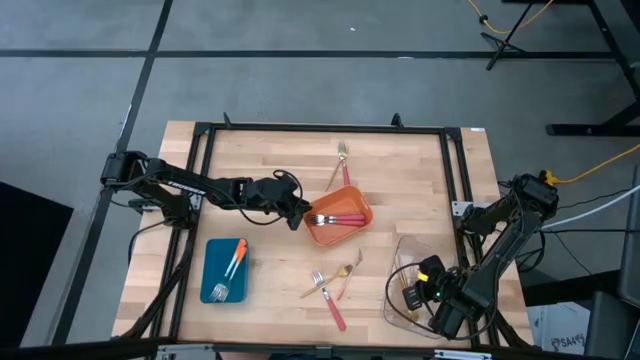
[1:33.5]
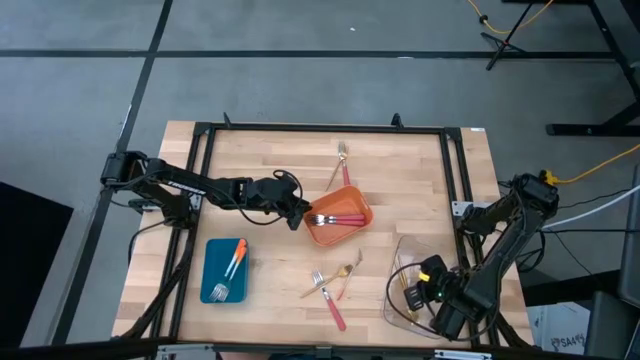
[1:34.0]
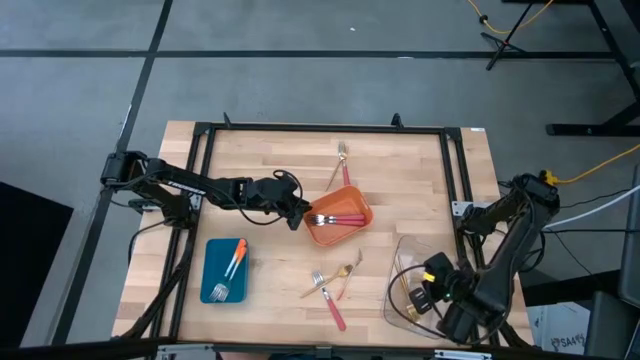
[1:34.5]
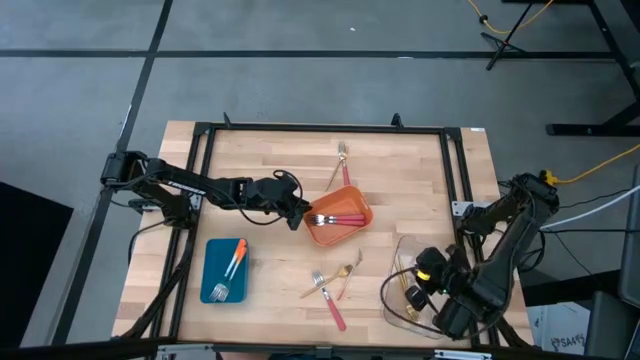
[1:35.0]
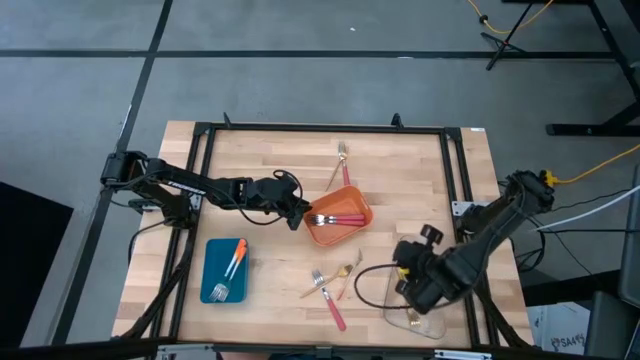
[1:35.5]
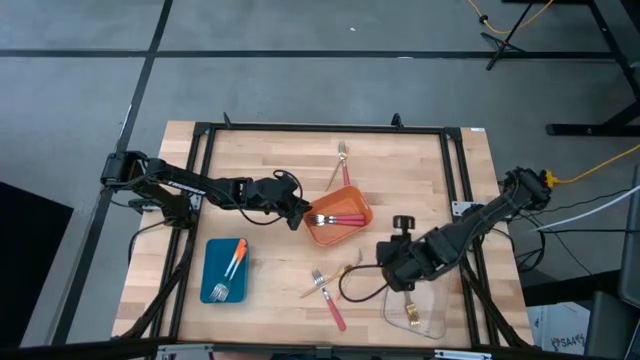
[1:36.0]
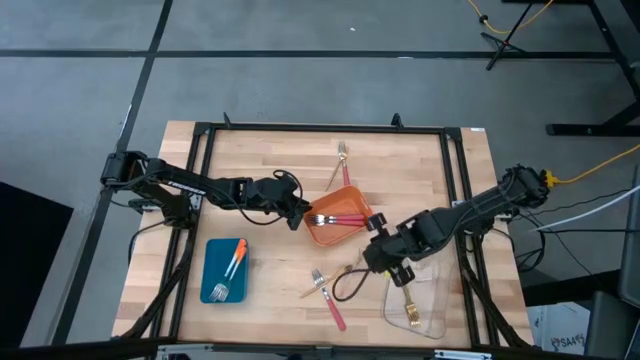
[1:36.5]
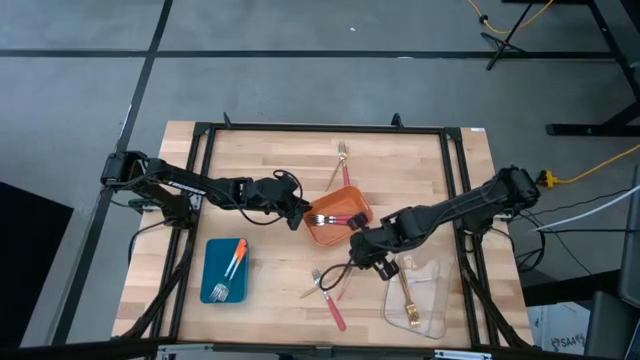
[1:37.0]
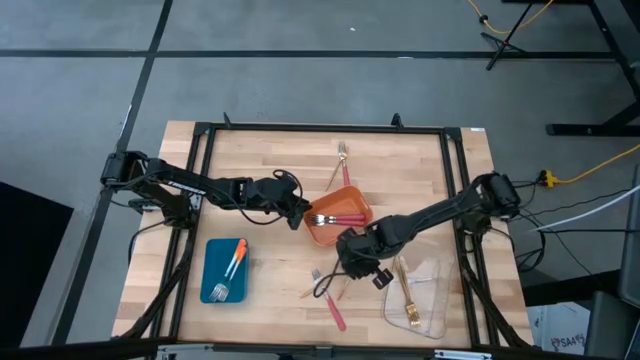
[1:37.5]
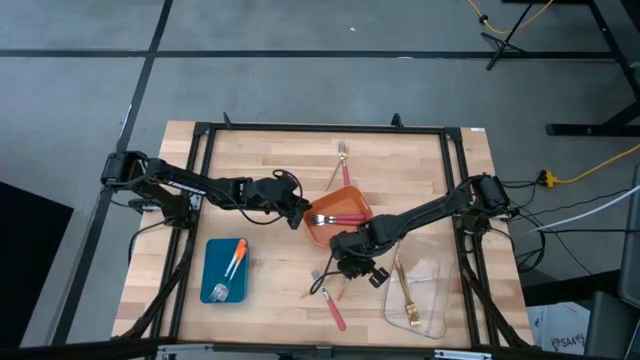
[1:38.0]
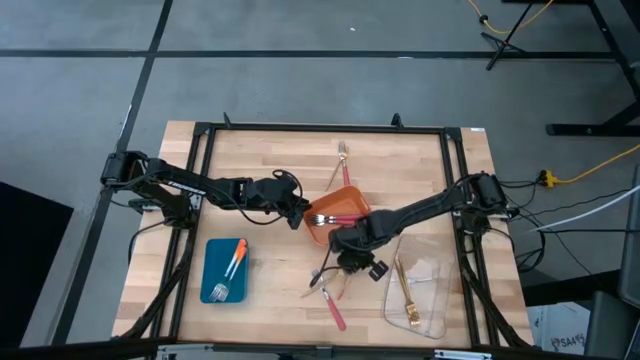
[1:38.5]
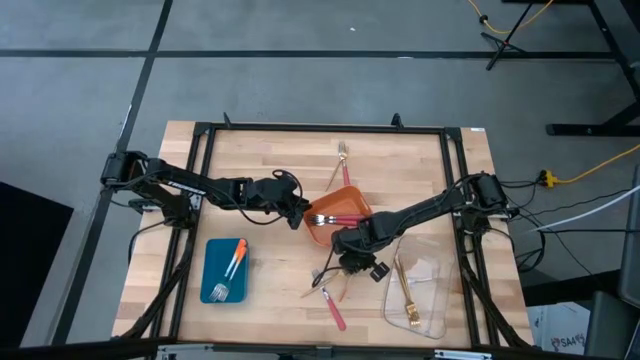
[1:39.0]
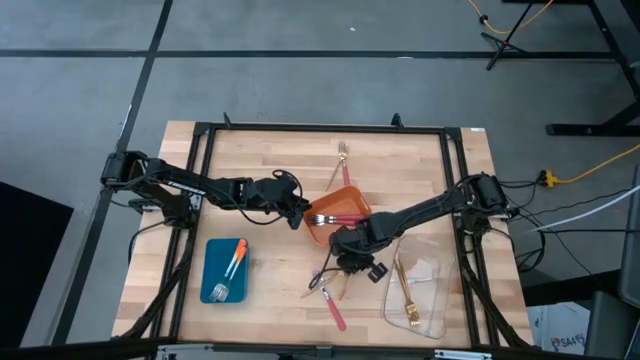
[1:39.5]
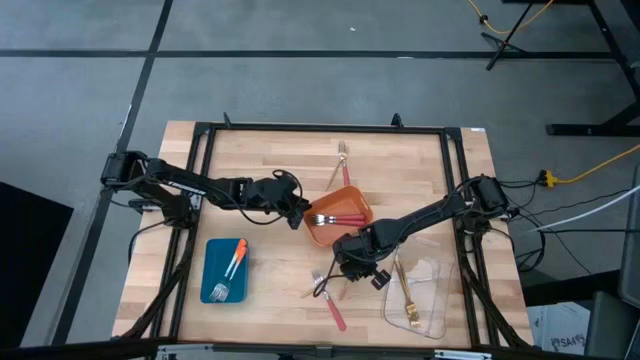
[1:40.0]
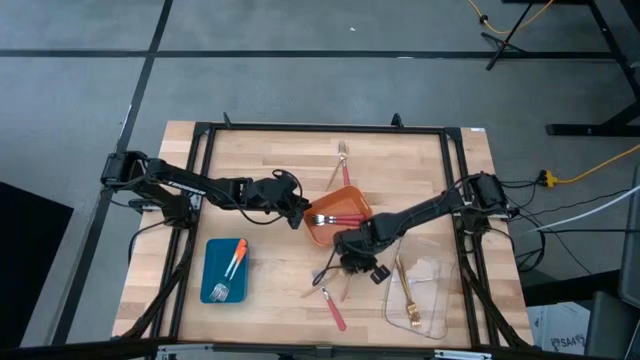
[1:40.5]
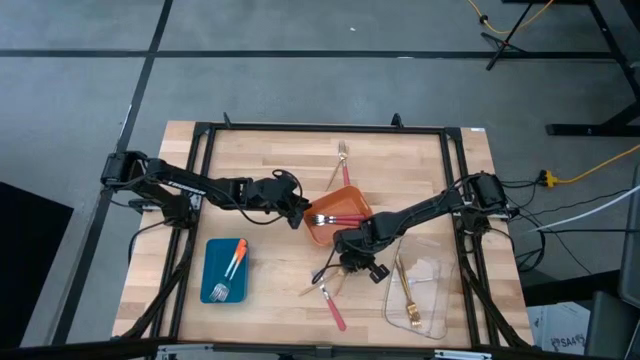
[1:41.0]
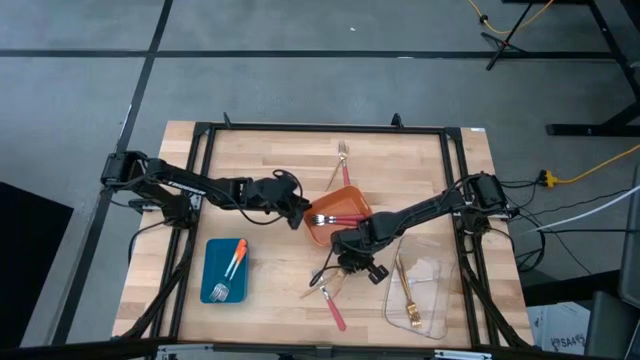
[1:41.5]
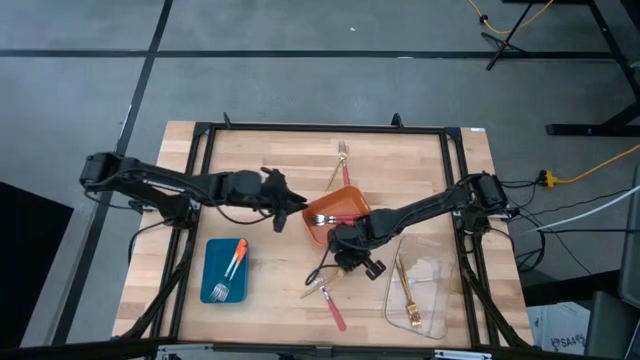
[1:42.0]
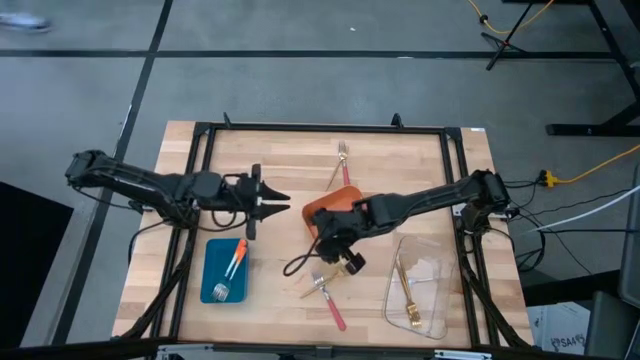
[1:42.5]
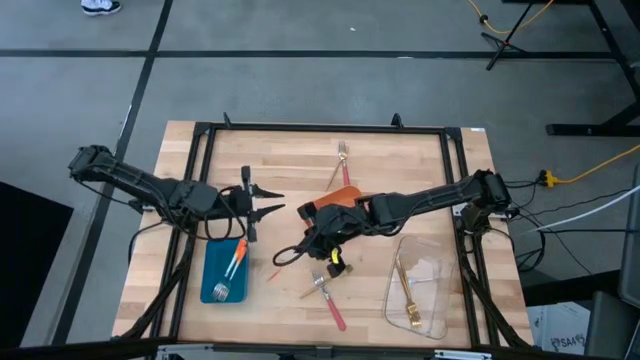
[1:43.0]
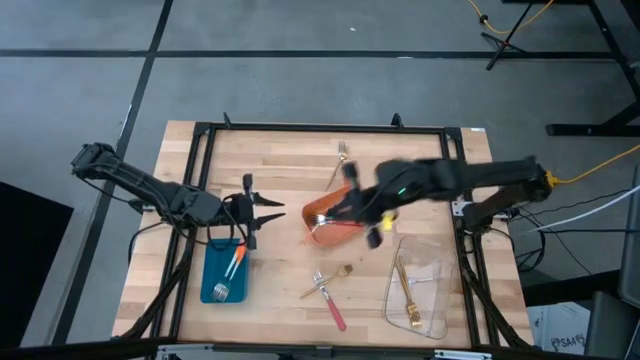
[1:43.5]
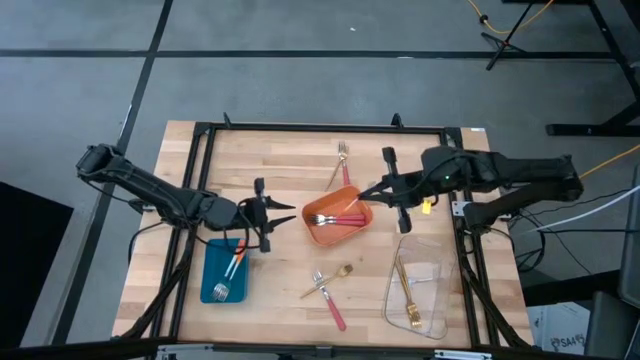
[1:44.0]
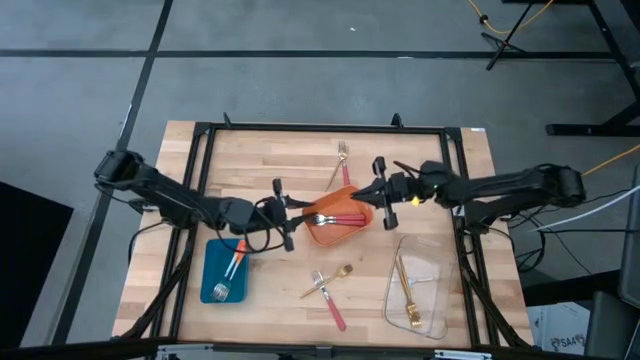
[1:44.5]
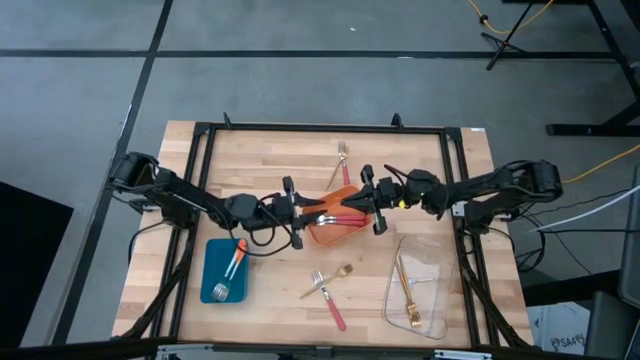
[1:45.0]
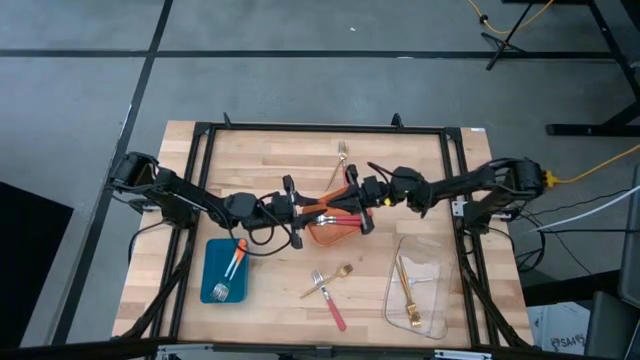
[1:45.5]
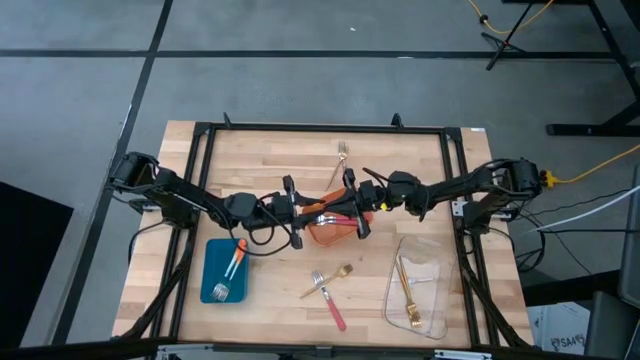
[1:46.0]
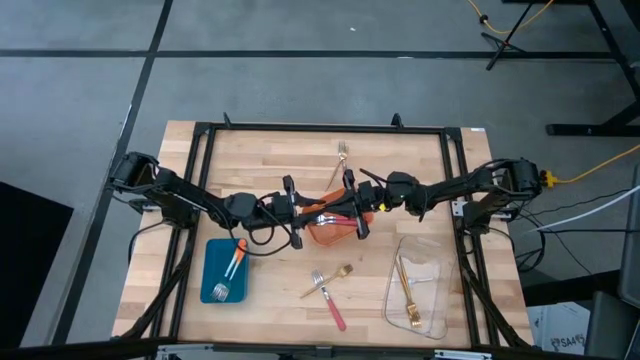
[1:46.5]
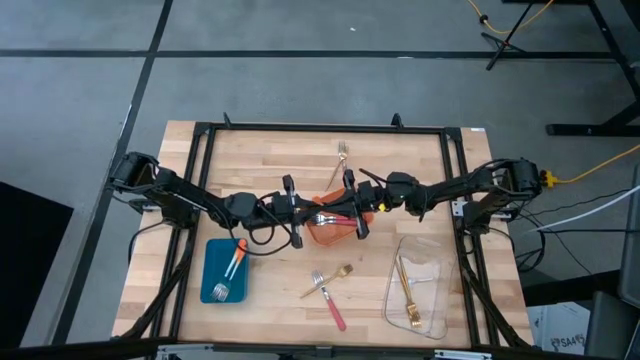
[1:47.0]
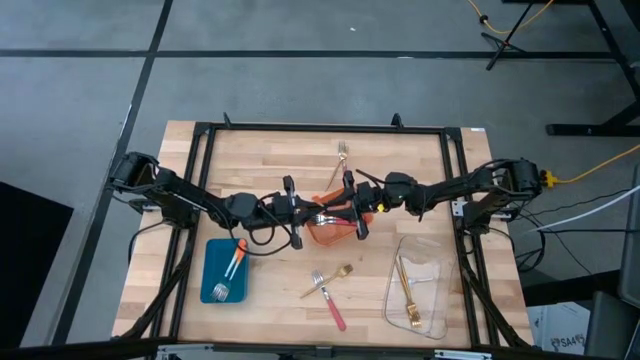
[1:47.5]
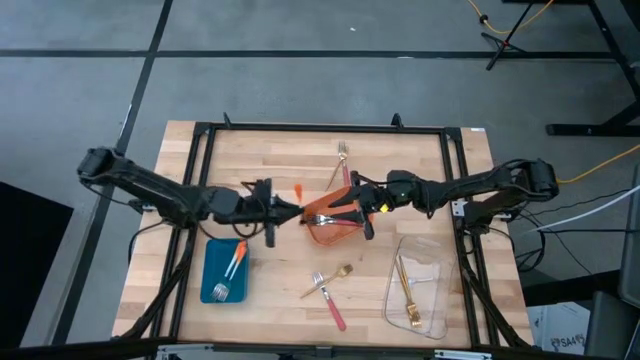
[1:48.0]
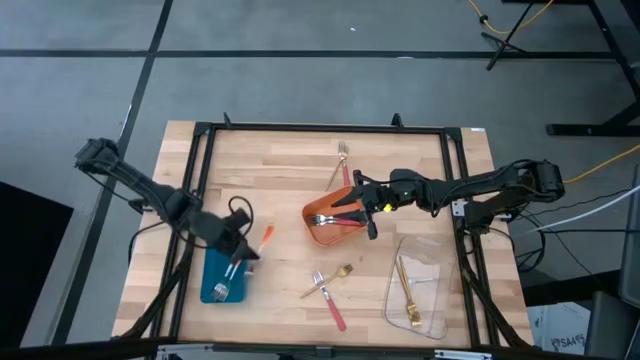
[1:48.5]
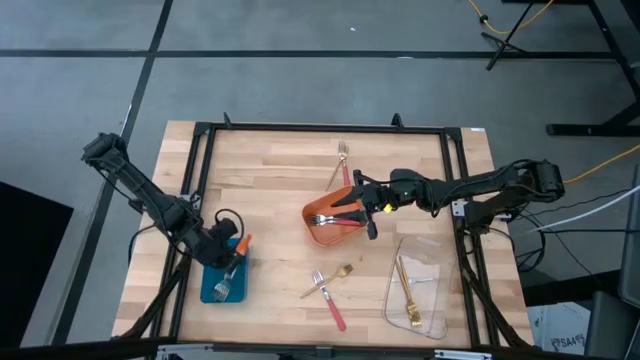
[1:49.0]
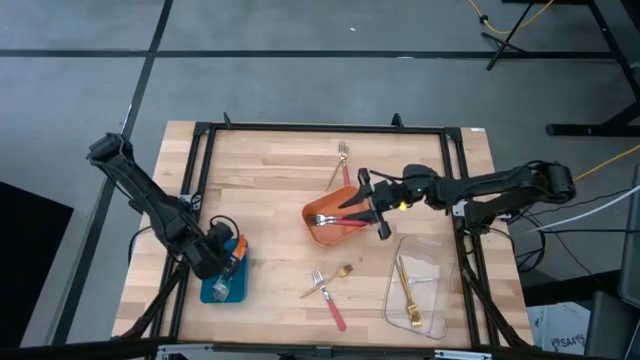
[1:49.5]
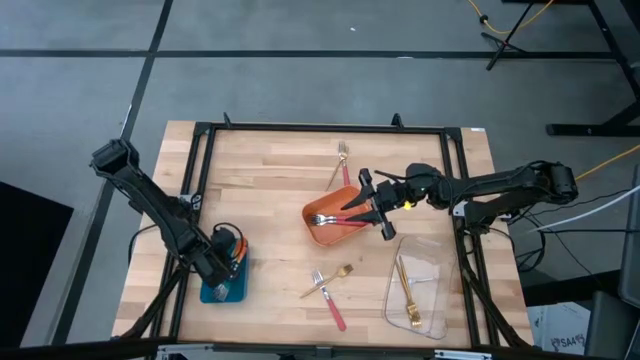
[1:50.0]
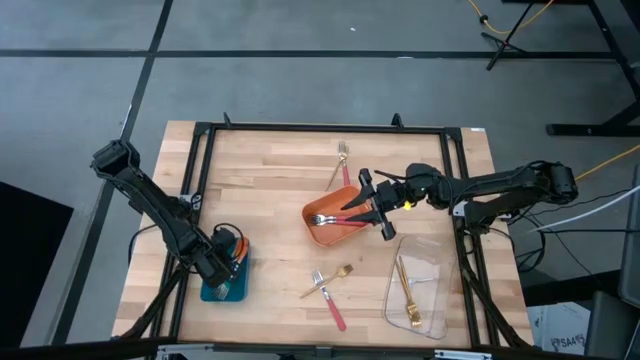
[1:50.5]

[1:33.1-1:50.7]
Task: Sort silverware by color (type)
Put the orange fork into the blue bin

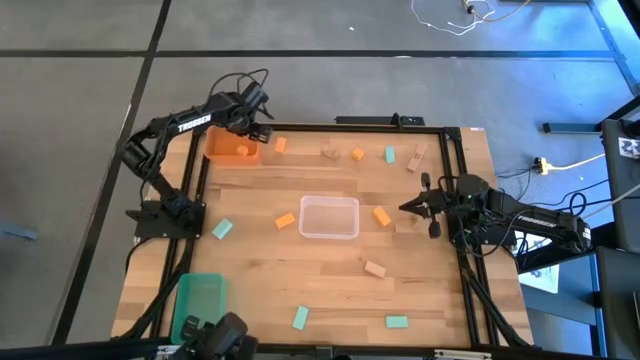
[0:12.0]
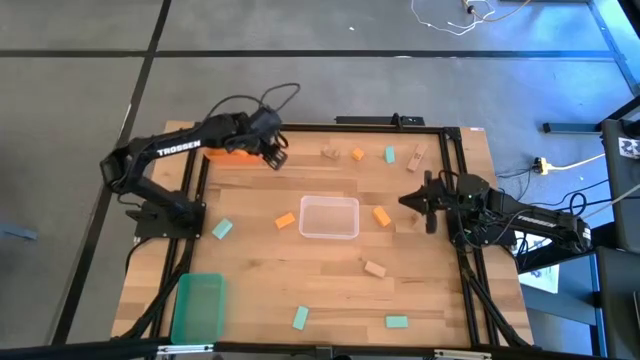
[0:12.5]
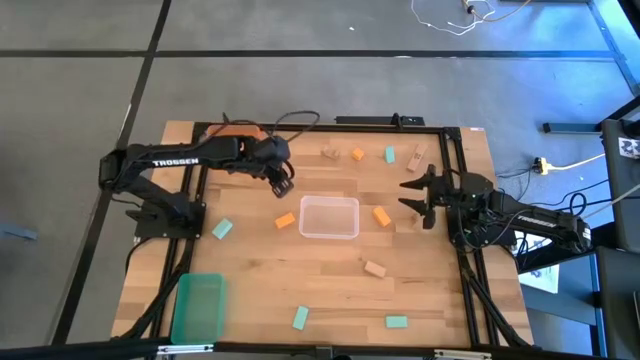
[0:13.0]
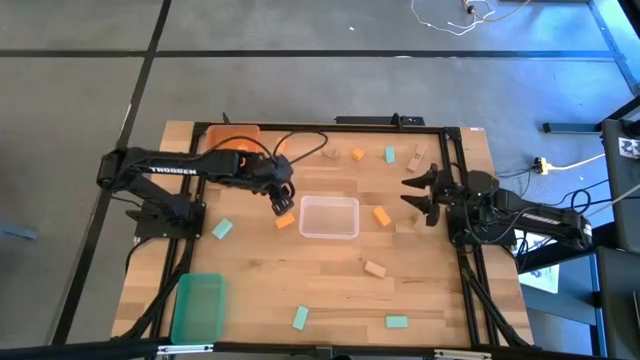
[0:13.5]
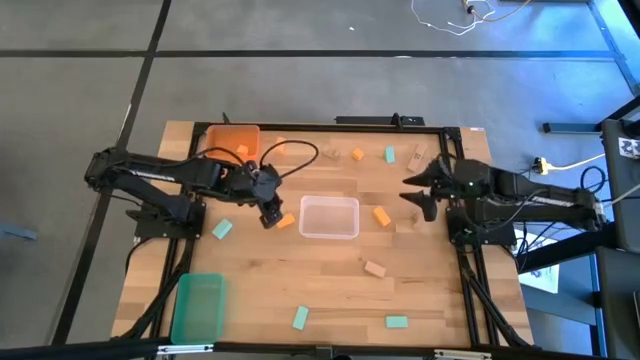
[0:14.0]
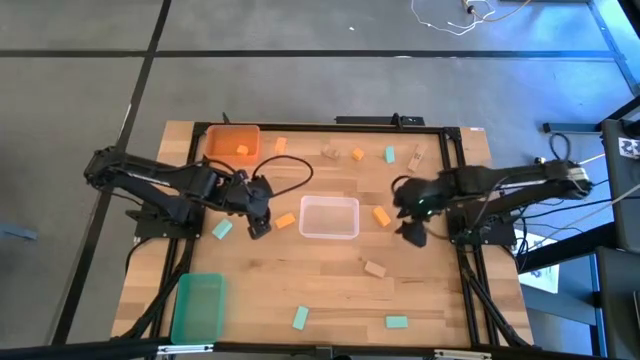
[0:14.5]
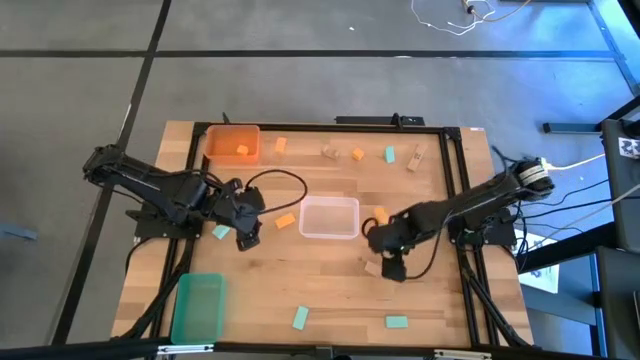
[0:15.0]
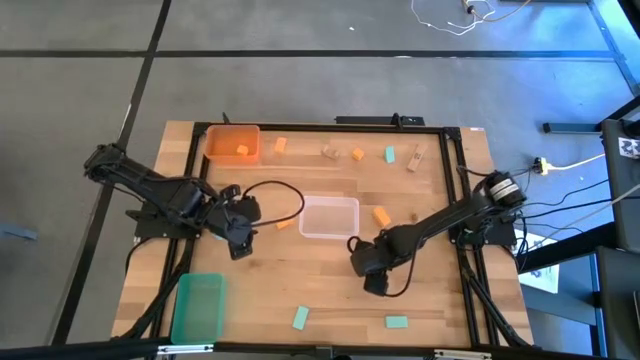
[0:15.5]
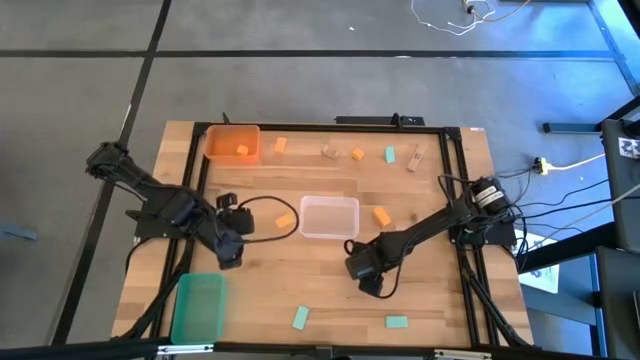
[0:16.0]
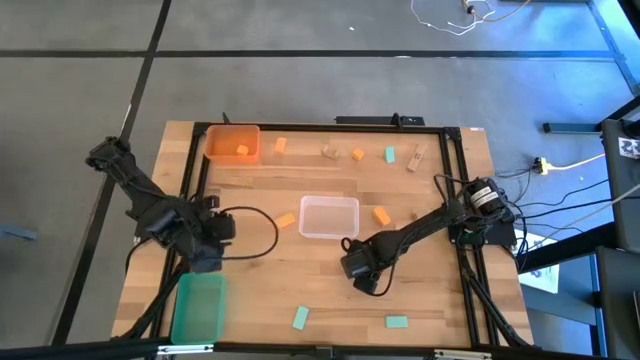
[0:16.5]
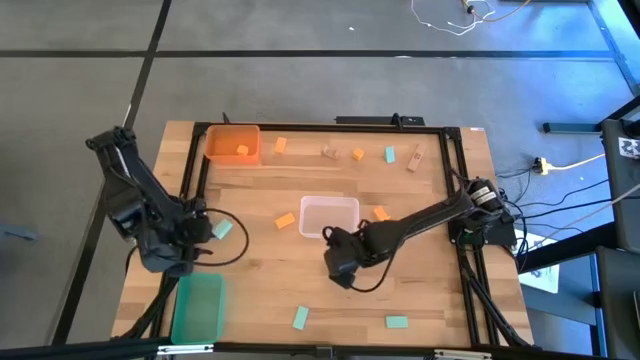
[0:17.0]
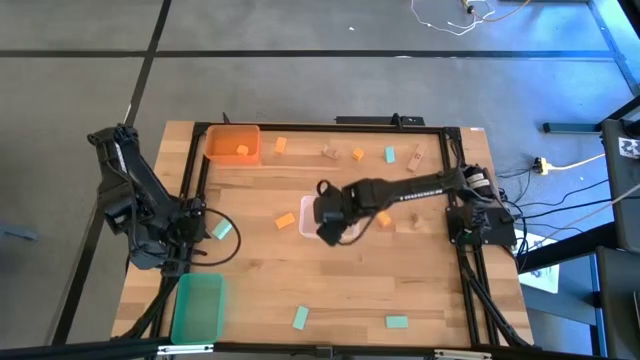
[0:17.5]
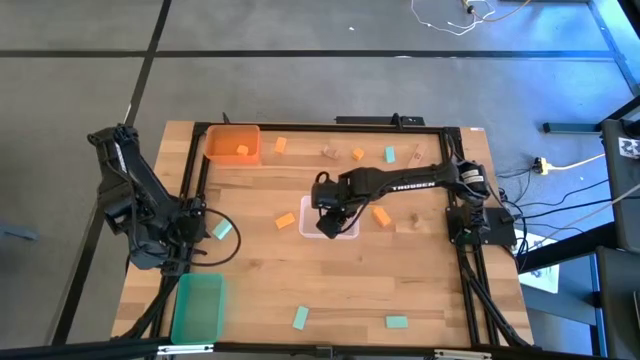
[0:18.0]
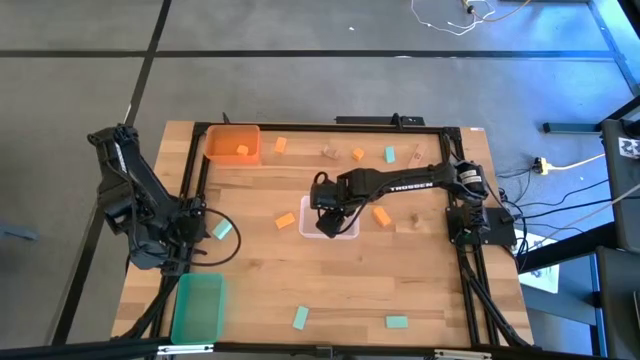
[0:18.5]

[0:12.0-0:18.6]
Task: Sort & place blocks by color
Put the light brown block into the white bin
